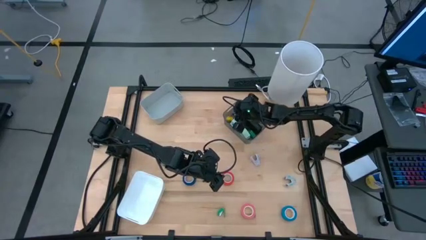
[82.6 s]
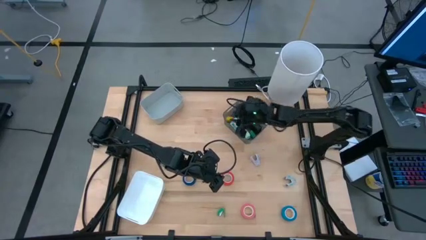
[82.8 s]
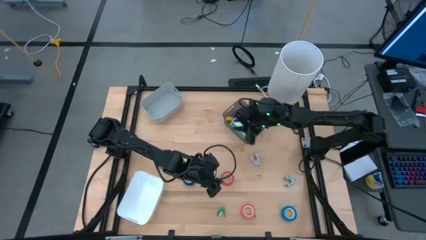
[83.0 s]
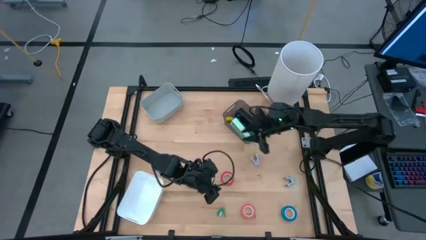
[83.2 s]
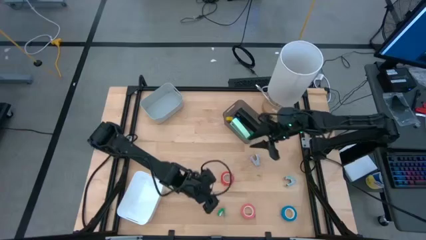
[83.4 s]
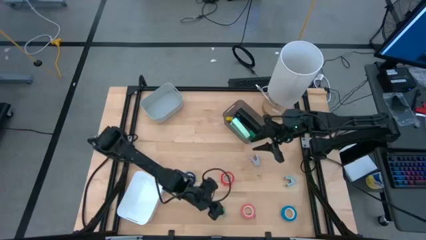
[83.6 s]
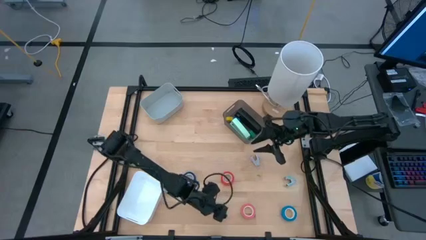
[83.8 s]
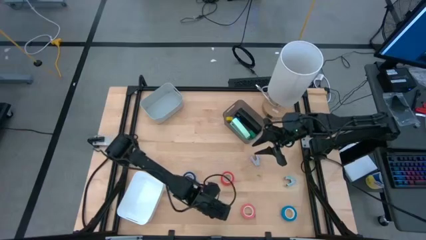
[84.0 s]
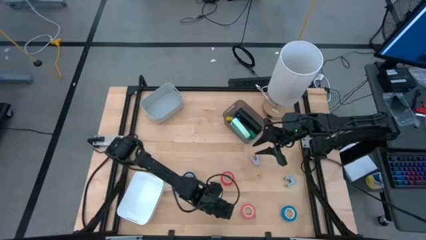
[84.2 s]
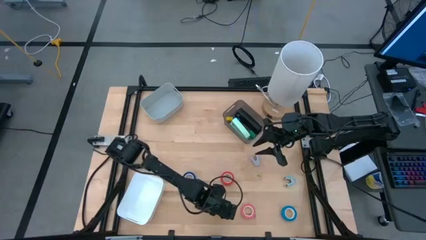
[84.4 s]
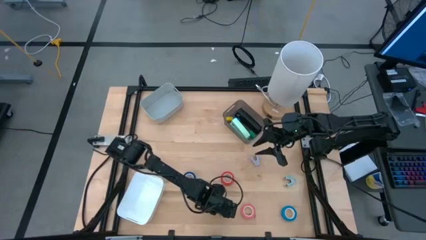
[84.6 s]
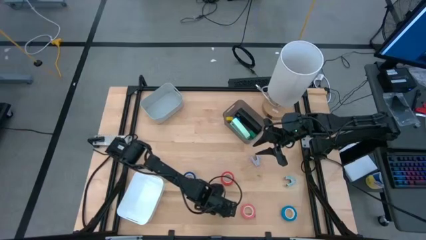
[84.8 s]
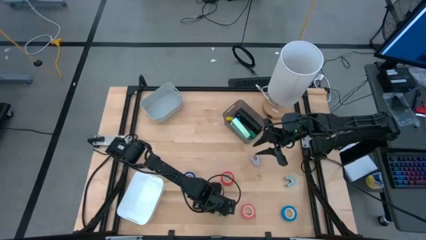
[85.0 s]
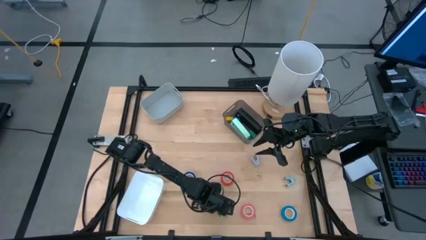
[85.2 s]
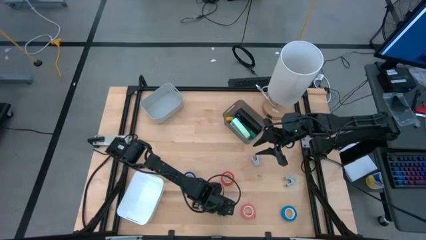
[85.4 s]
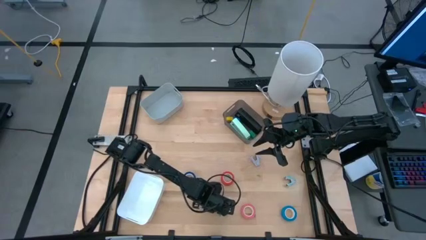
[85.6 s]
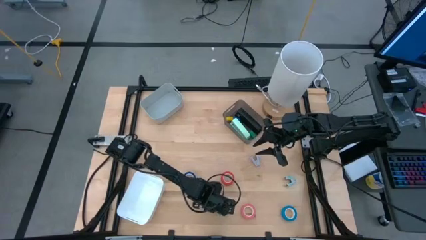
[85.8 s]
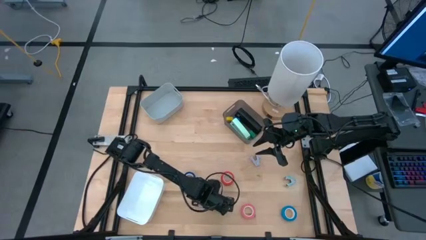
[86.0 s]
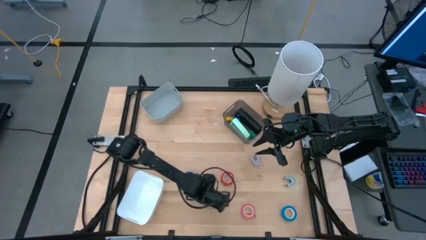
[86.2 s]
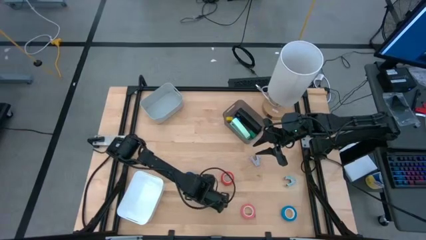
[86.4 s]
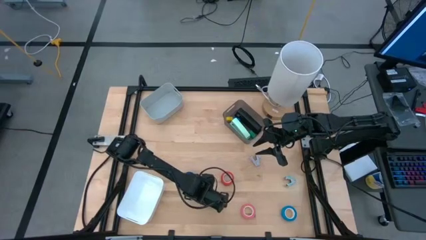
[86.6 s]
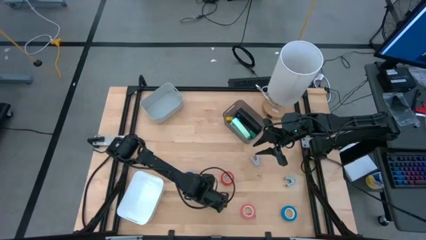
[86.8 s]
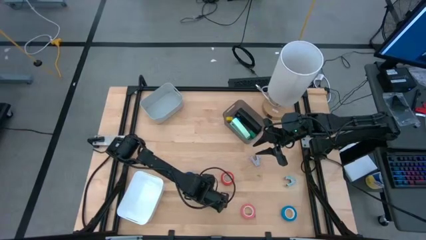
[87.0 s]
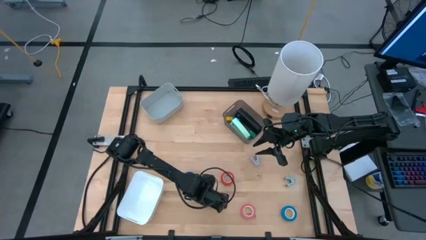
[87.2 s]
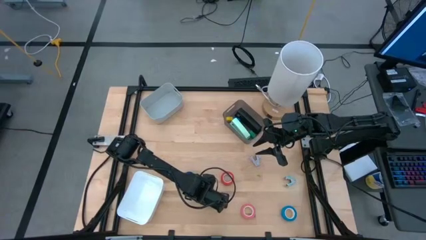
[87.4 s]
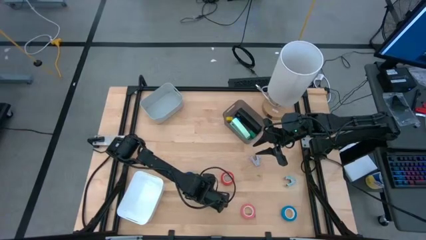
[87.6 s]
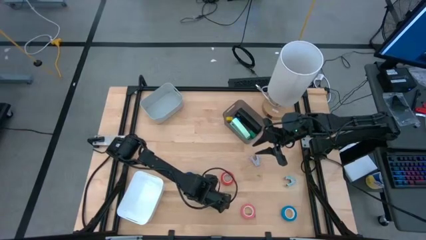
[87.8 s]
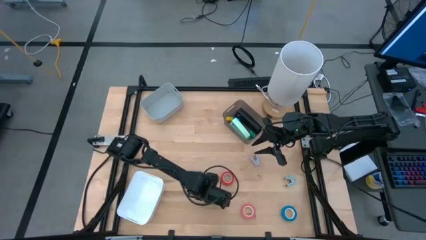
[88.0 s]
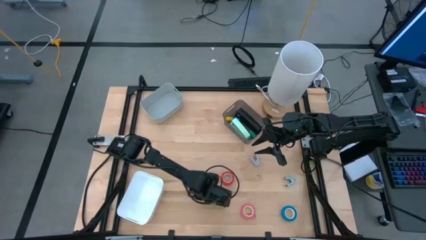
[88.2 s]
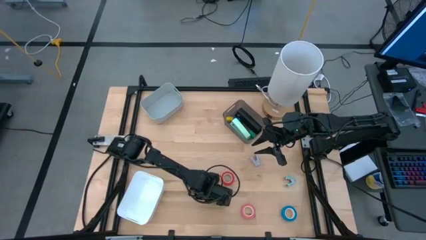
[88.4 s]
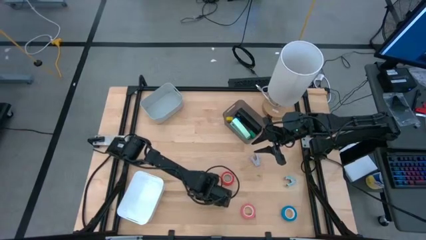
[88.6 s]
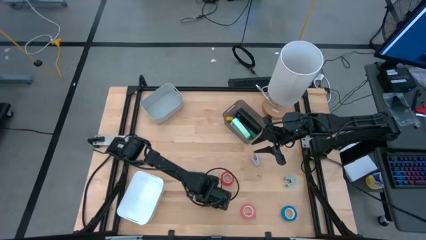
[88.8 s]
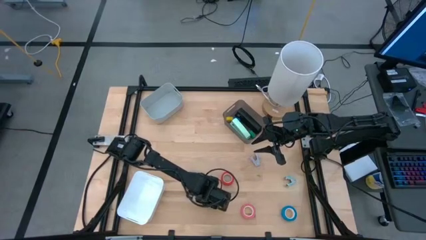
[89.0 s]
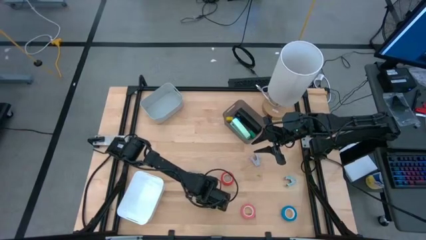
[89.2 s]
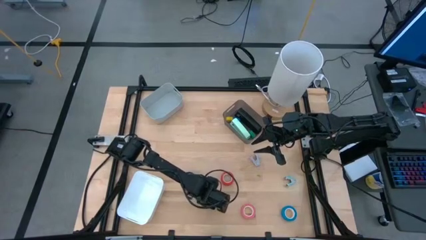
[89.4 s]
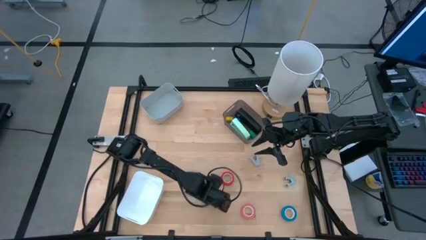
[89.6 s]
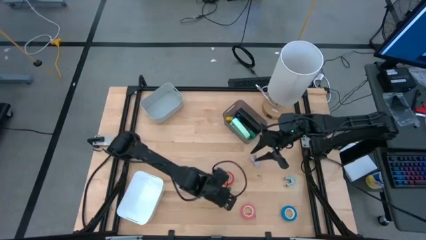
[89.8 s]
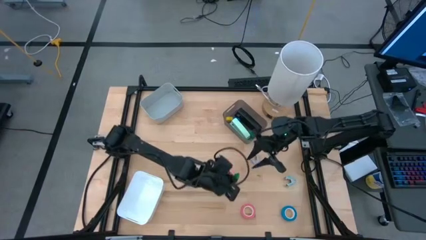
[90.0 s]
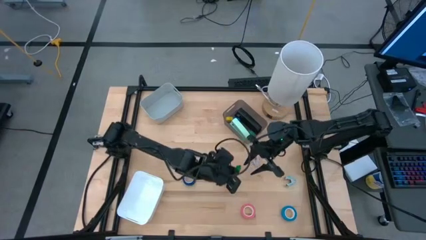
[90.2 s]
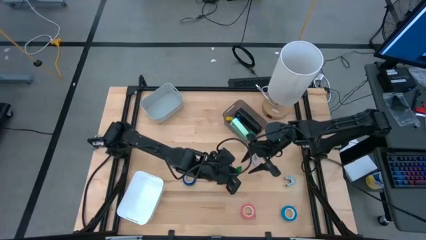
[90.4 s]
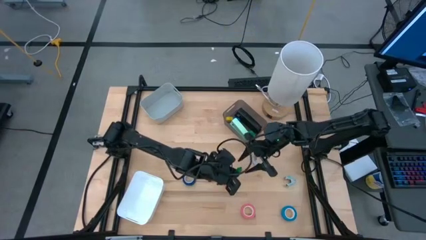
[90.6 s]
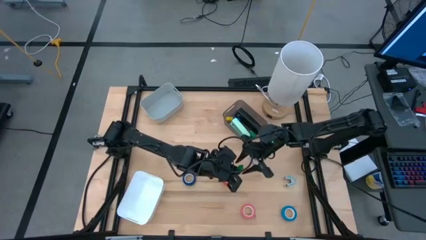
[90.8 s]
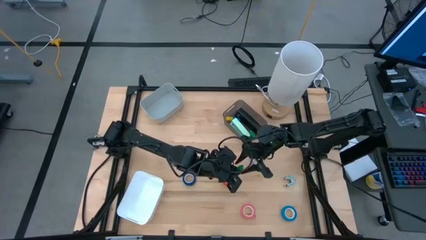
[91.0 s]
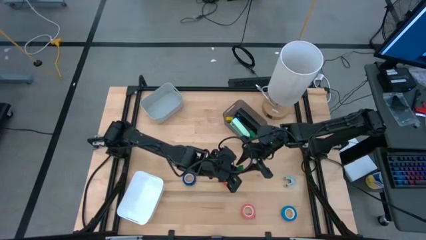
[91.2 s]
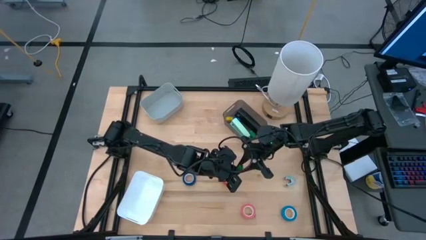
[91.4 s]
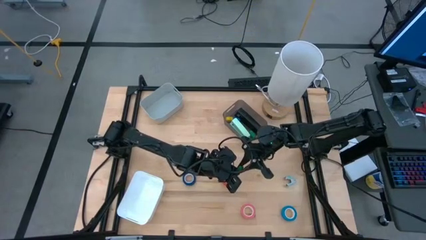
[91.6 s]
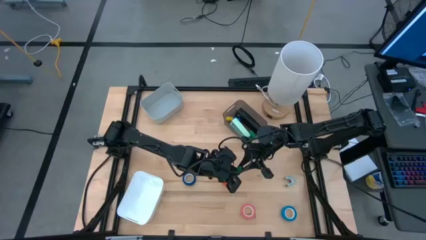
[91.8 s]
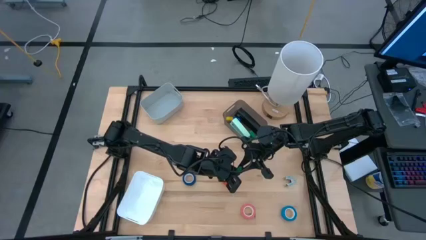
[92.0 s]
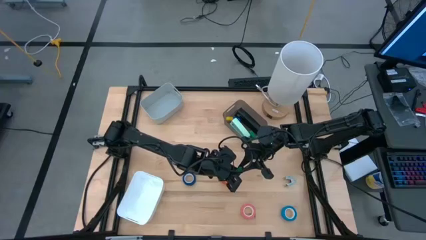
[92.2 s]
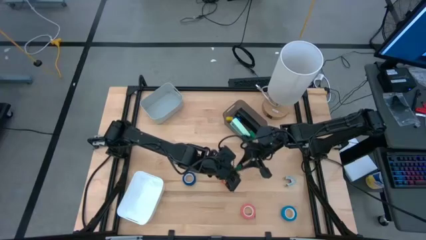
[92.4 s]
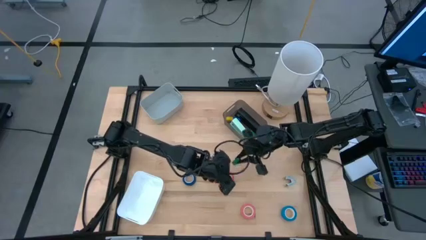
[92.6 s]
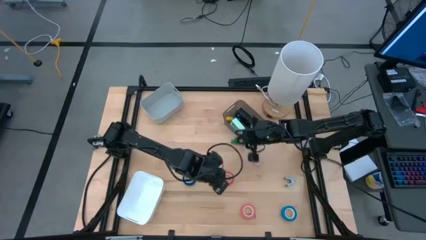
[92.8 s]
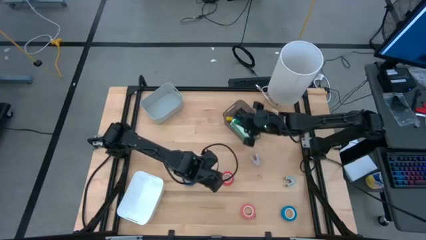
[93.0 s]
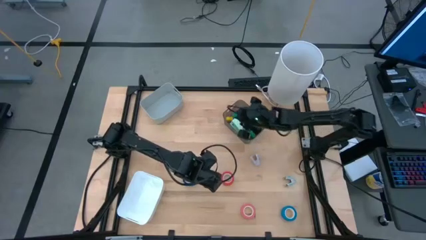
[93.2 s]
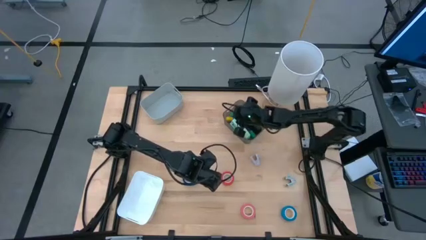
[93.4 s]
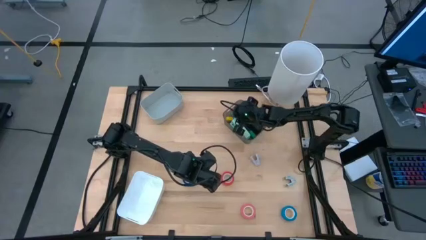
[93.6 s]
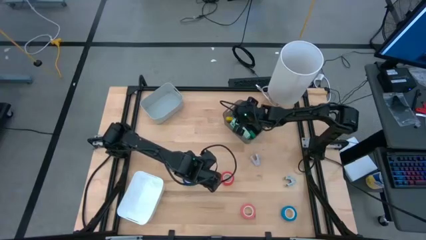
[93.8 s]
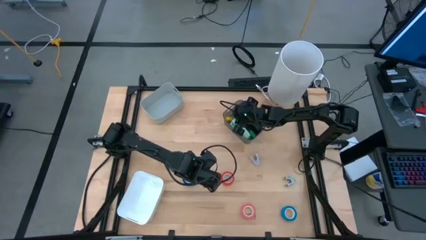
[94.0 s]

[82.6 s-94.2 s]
Task: Pick and place Stapler, Stapler remover, tape
Put the small green stapler into the black bin

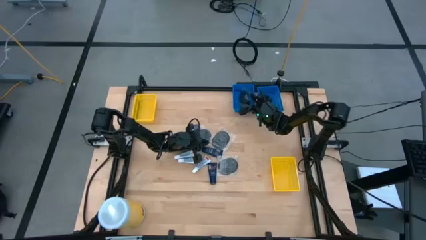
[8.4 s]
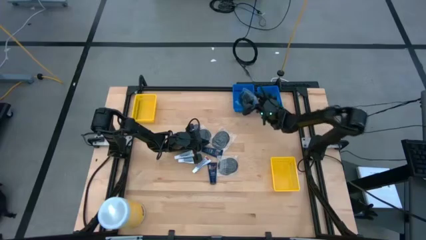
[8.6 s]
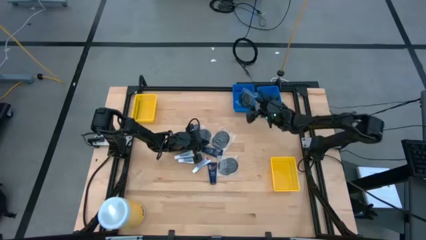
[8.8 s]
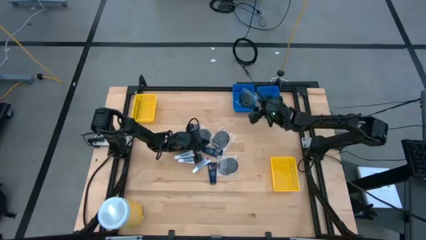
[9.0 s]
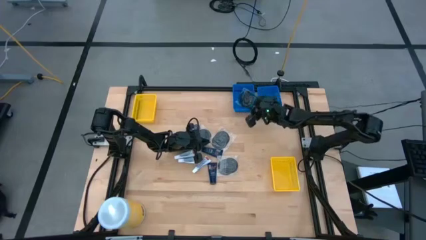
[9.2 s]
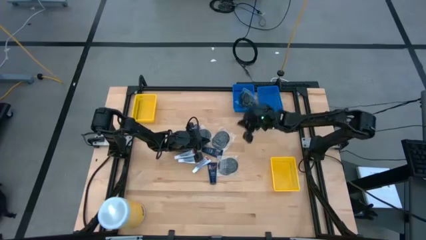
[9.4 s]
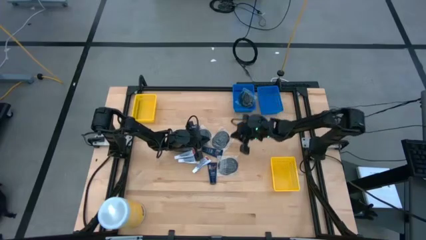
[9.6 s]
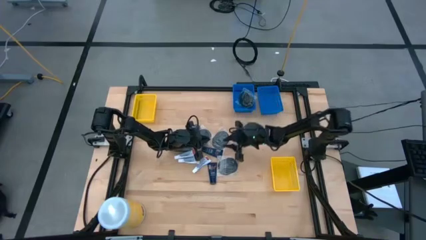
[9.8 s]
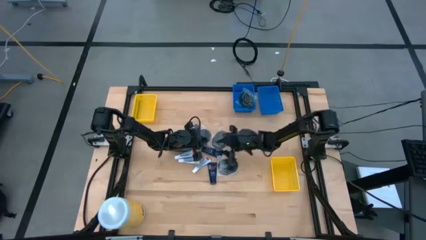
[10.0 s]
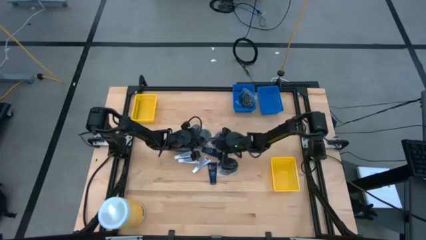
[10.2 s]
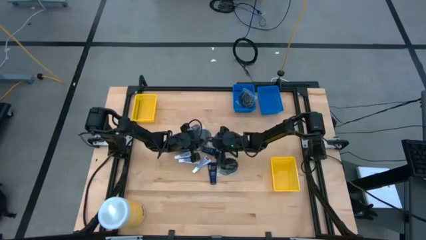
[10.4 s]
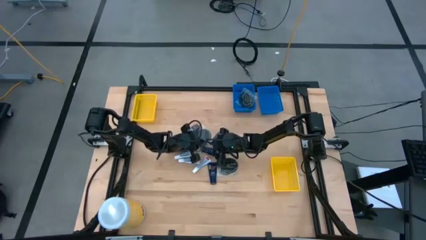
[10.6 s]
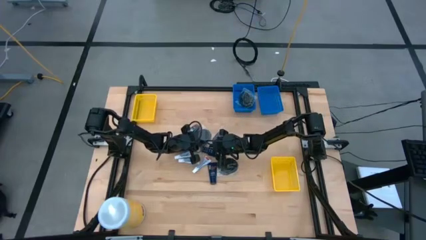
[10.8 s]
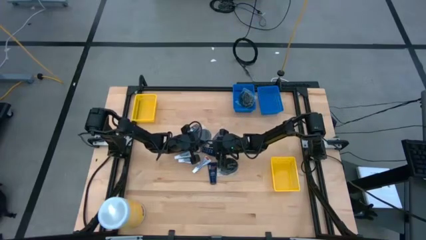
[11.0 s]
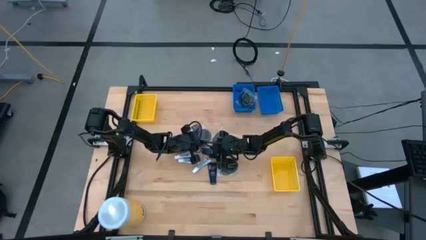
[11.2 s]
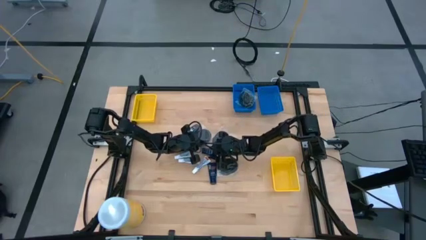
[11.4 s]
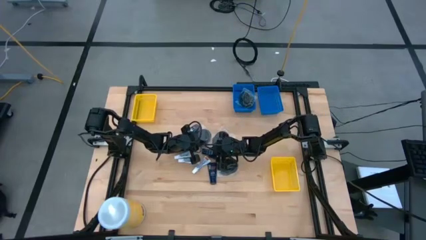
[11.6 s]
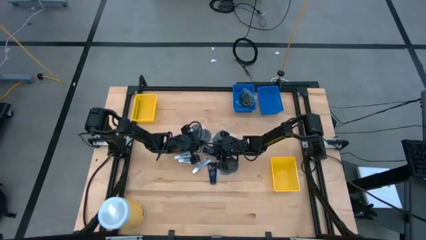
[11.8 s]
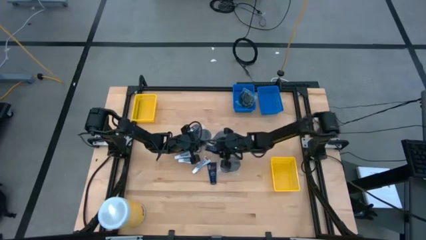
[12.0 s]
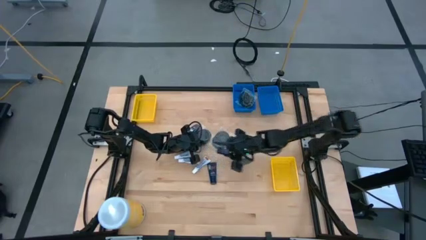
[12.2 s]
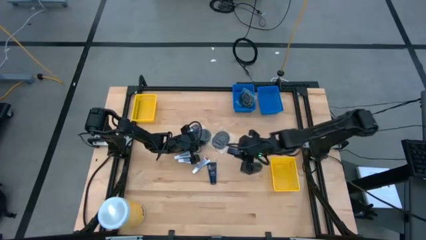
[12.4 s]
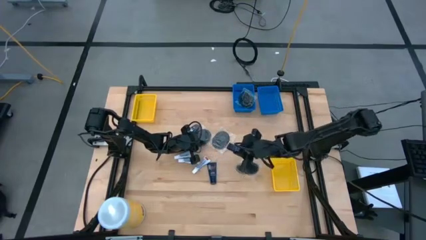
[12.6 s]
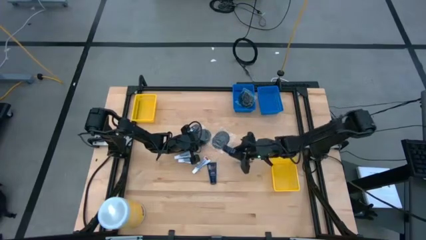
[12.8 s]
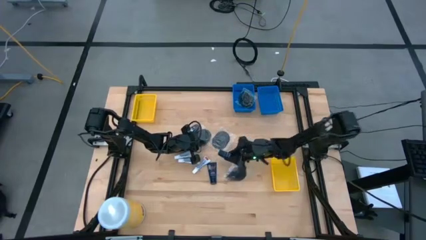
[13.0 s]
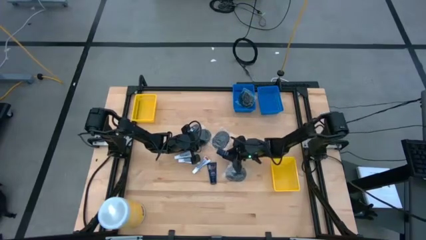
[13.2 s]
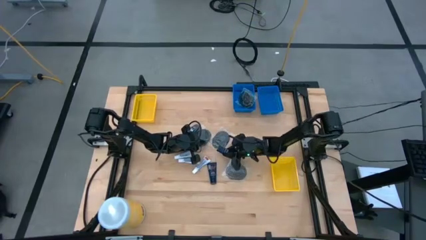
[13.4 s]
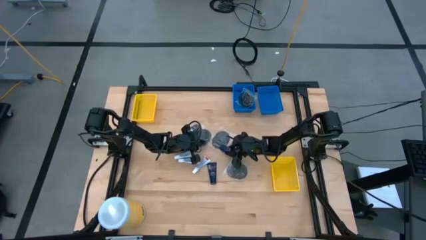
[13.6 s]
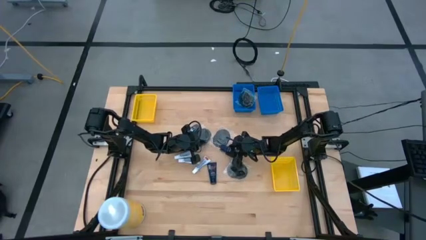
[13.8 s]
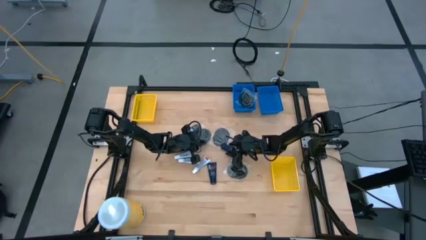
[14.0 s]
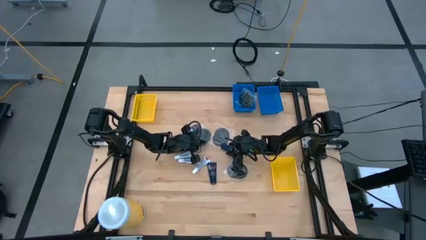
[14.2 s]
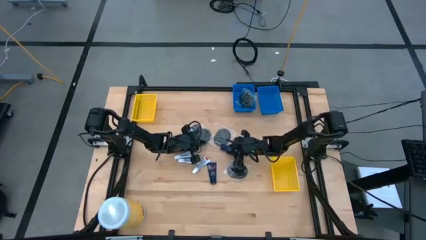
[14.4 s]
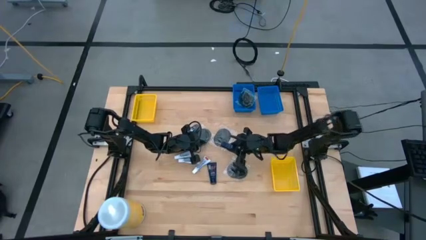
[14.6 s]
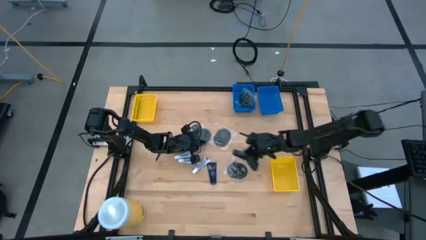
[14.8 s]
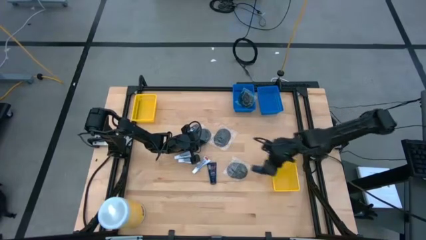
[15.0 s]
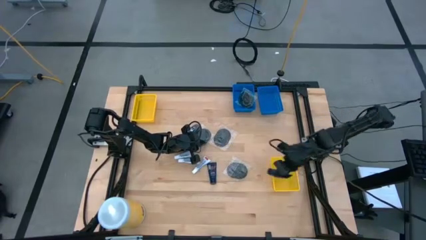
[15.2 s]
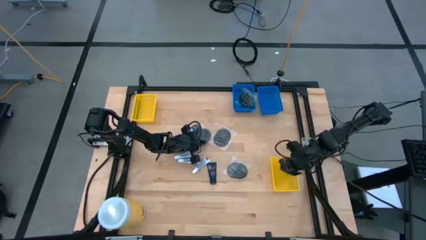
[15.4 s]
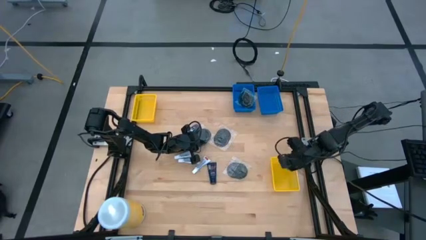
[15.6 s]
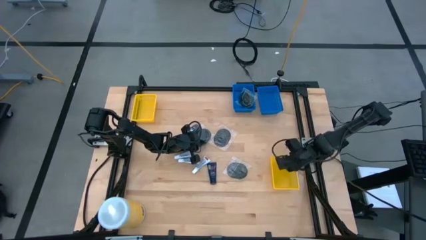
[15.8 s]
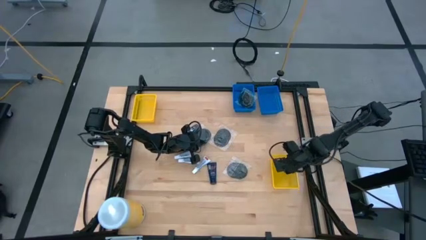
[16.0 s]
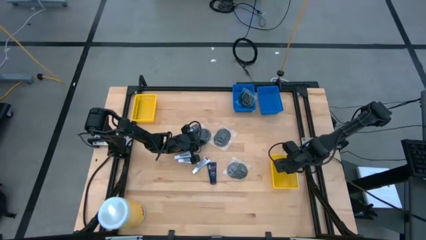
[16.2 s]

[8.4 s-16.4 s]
Task: Pick & Place Travel size toiletries
Put the blue shave cream into the right yellow bin
